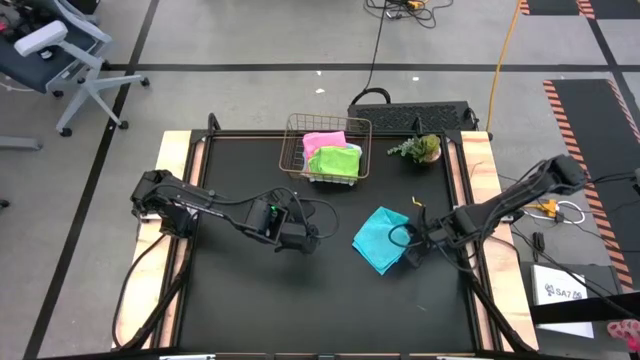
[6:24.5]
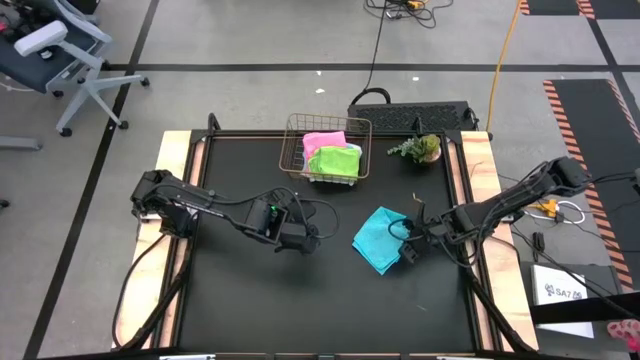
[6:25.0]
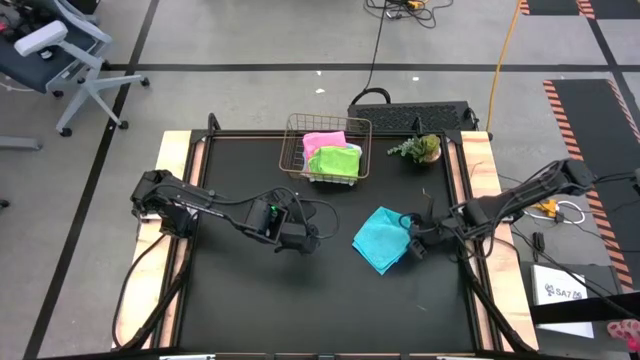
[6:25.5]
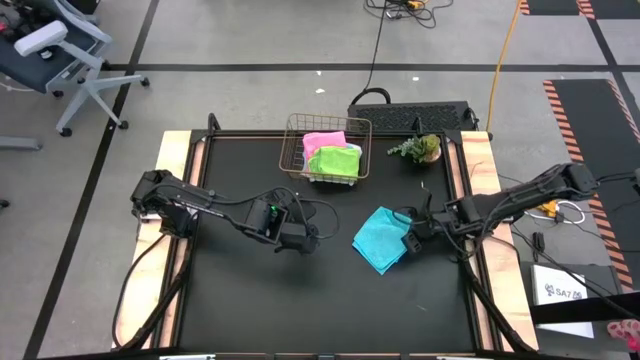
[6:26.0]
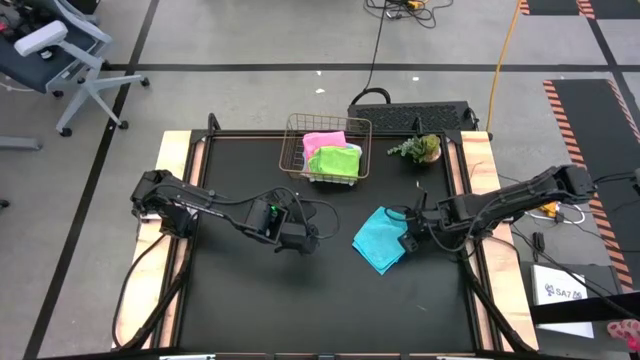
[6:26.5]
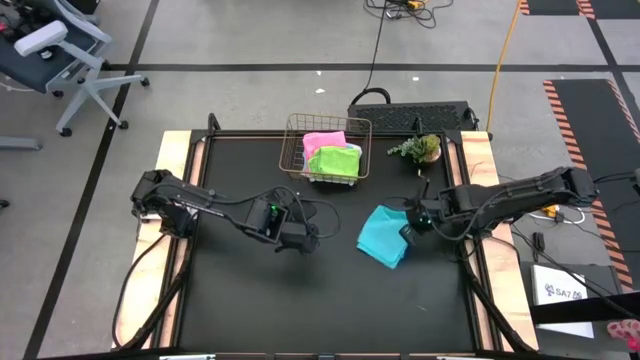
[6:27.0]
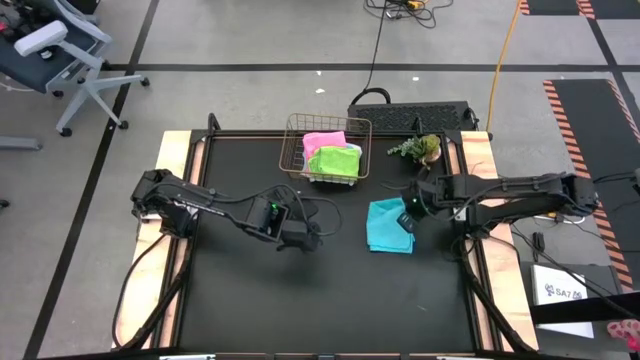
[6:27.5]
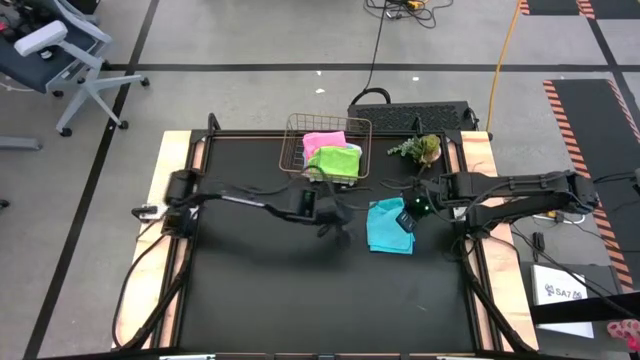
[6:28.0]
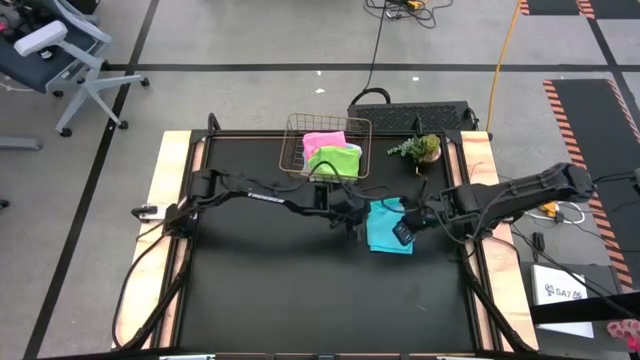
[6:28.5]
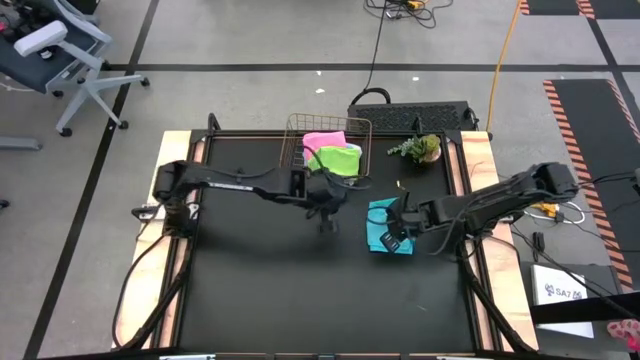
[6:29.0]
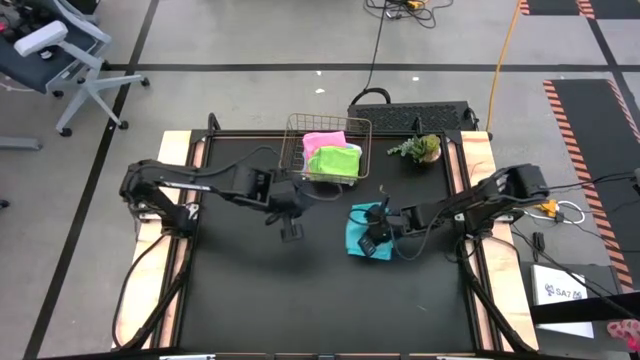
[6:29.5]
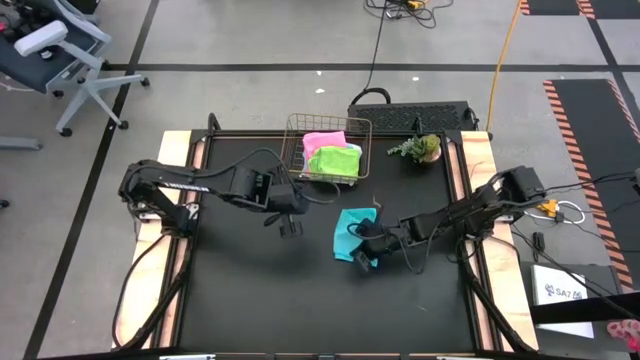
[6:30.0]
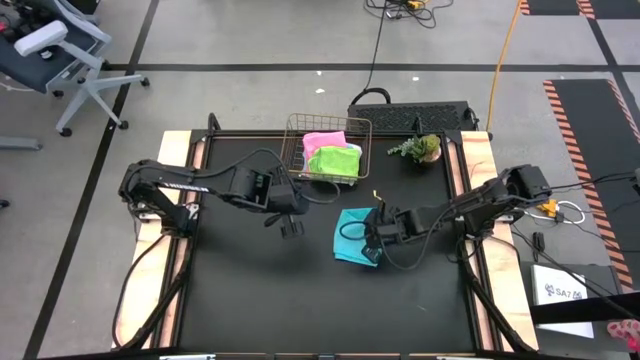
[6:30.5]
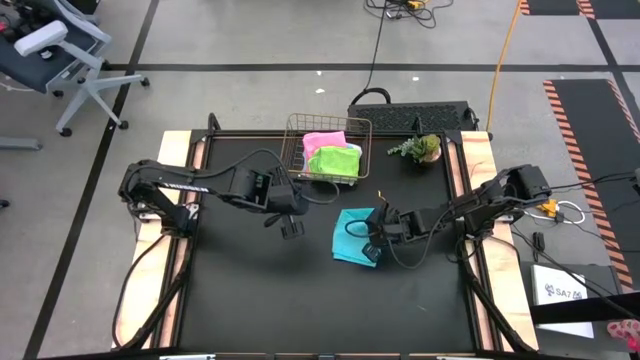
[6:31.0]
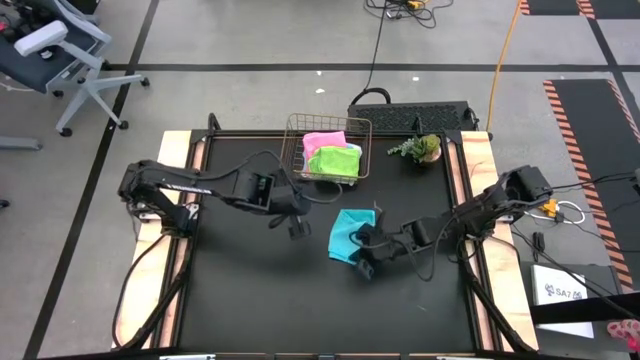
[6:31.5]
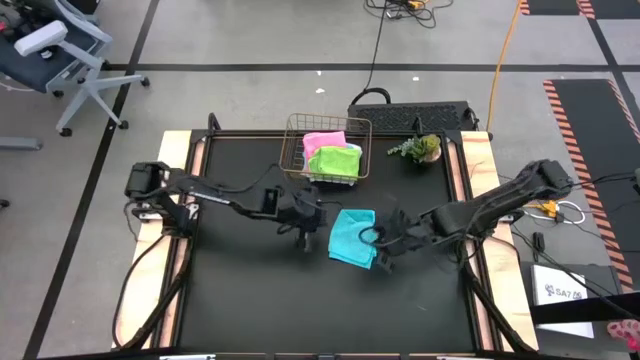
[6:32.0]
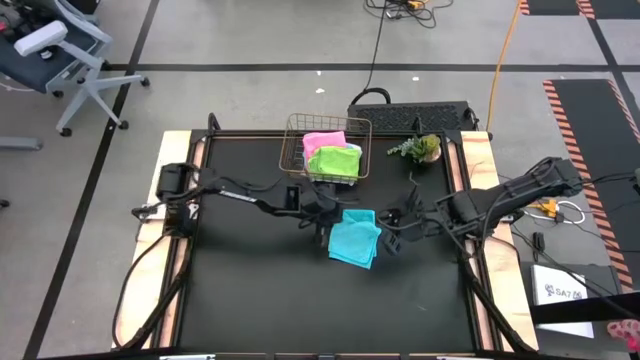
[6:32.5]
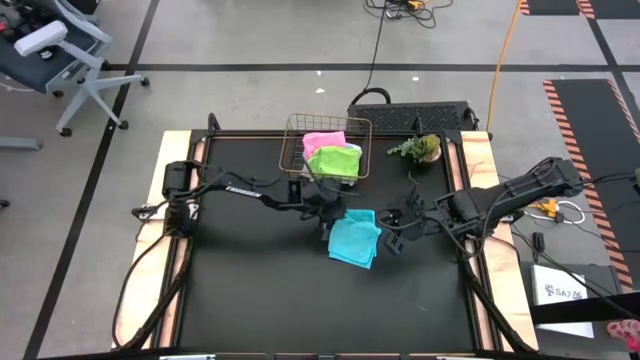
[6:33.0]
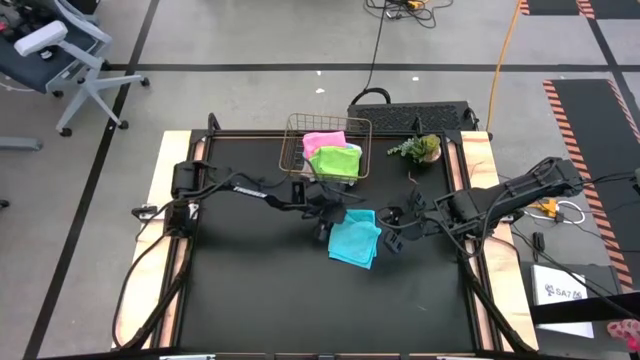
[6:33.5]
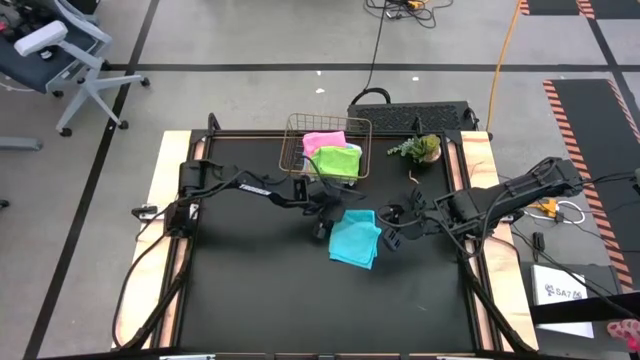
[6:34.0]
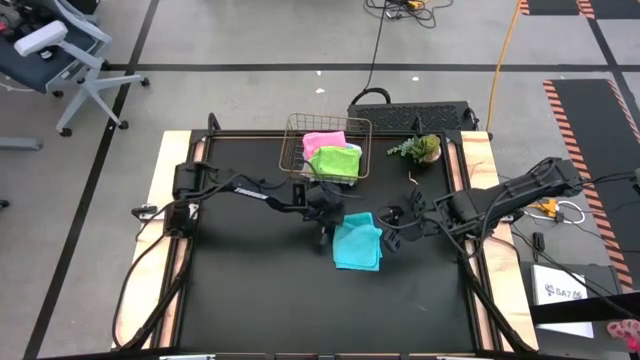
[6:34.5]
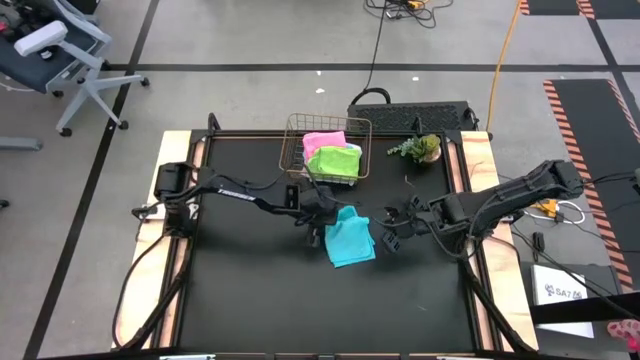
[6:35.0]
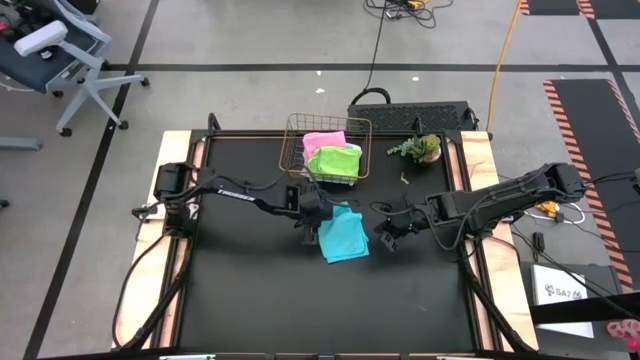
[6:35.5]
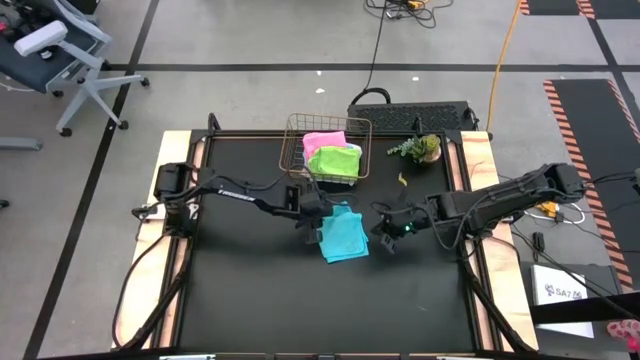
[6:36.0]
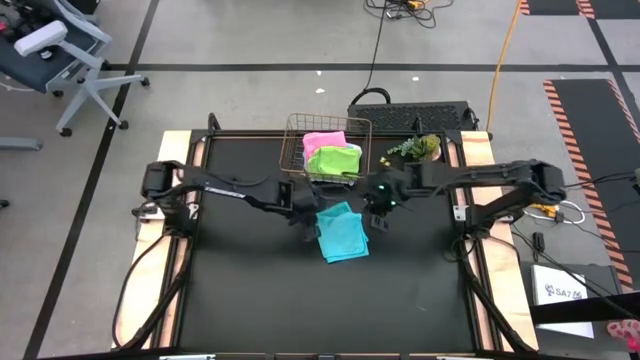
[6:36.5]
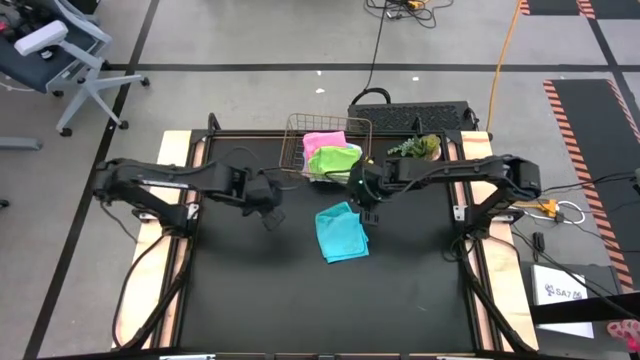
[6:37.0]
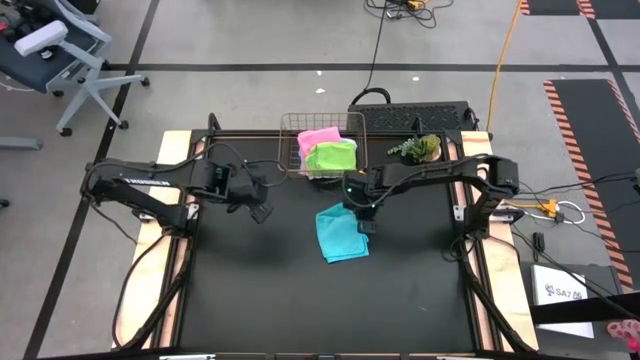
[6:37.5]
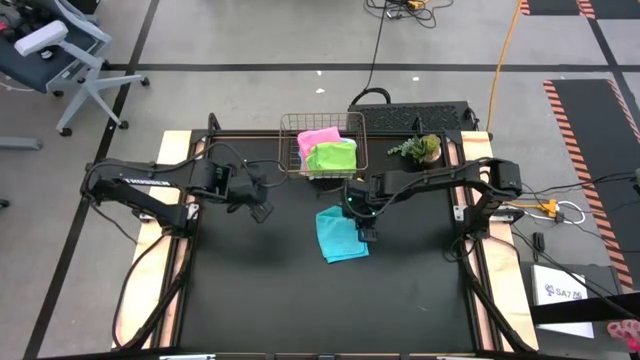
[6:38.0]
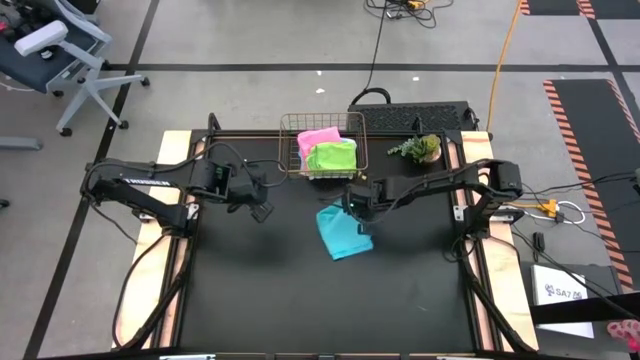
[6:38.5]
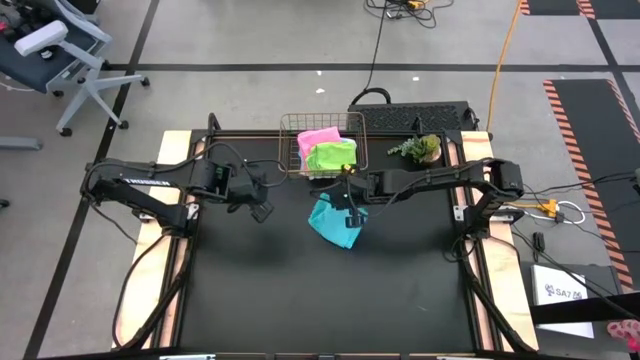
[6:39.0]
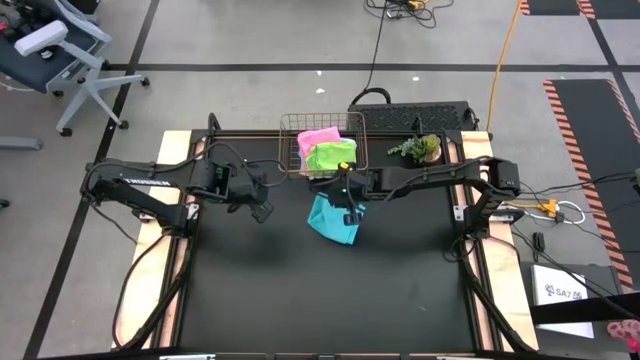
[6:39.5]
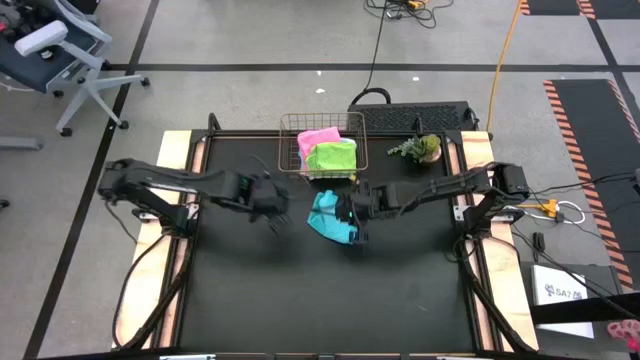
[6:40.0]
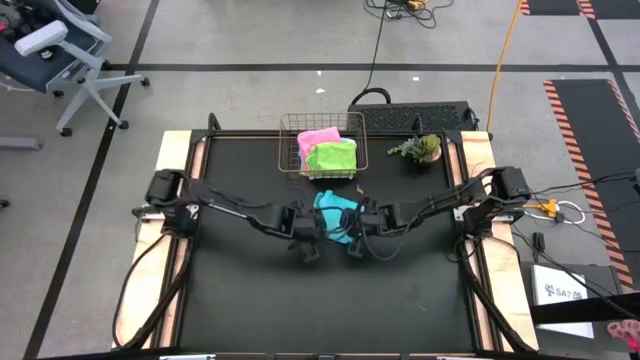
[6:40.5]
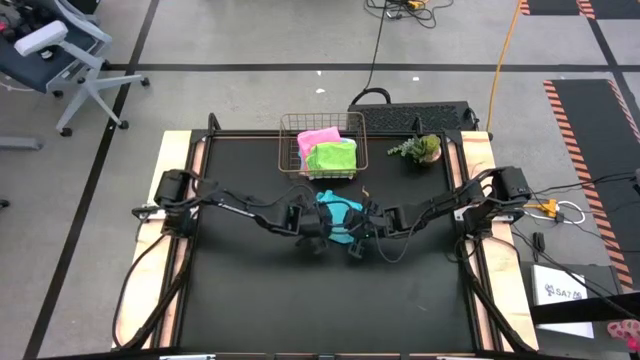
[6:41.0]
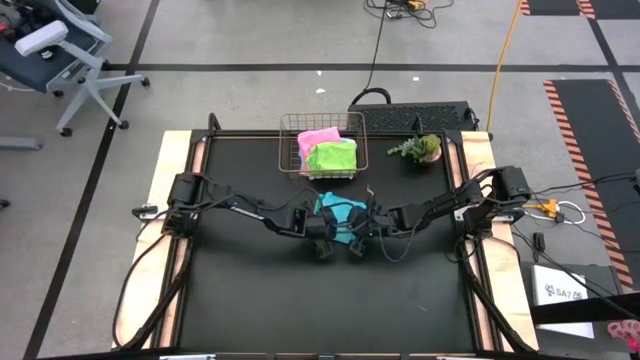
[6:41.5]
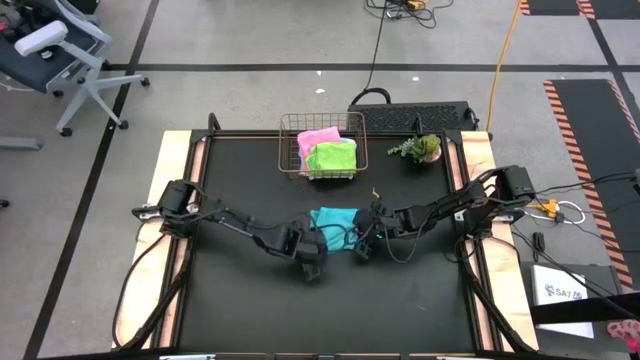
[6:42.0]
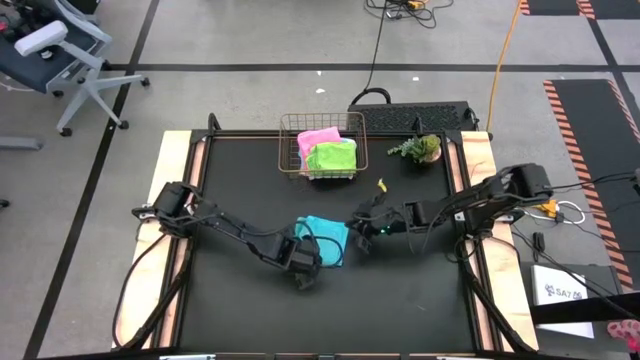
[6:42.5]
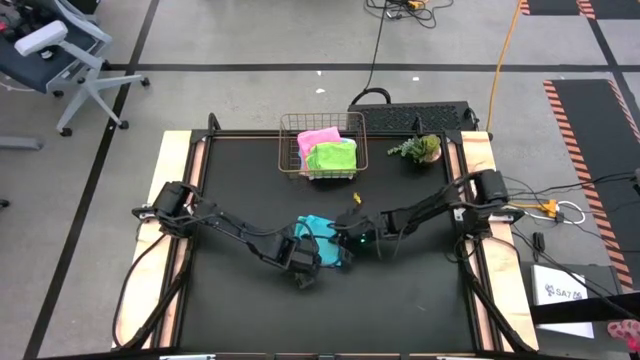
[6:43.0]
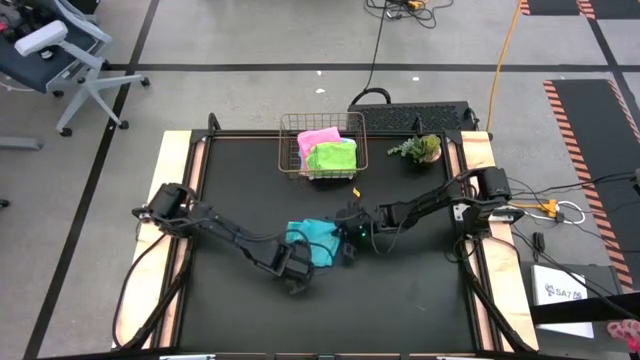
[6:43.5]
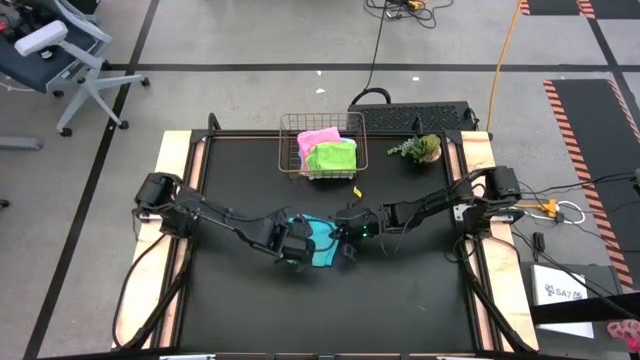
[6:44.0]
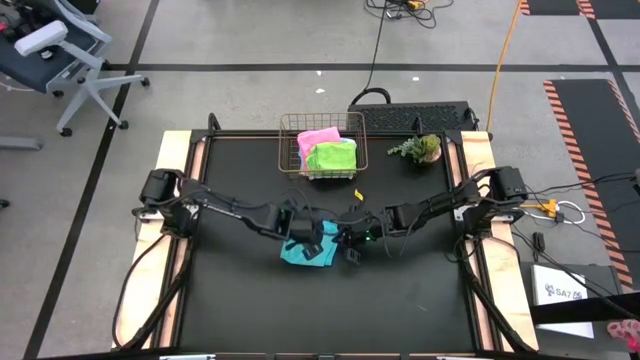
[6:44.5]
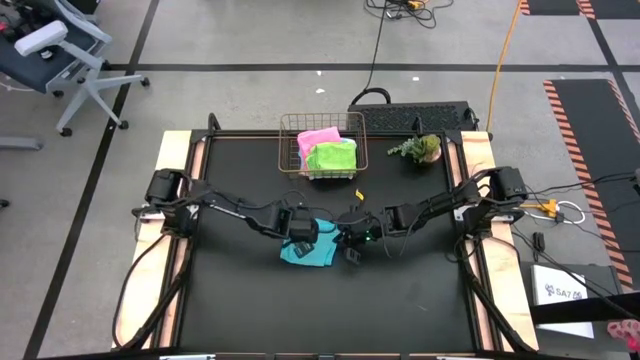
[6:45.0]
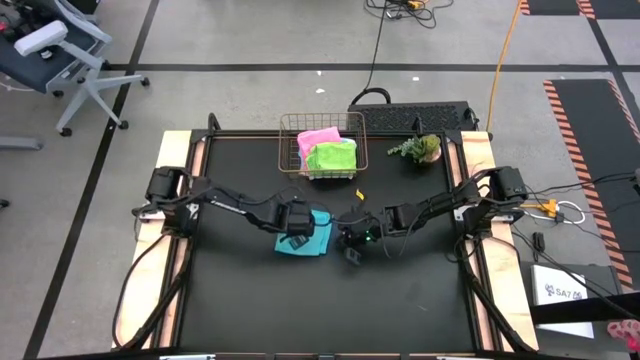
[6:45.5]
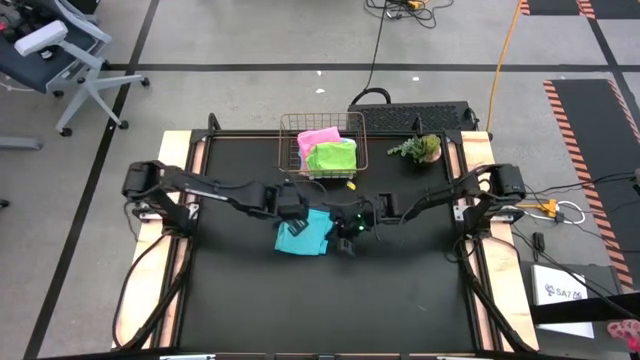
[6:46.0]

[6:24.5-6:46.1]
Task: Fold microfiber towels
Fold the blue microfiber cloth
